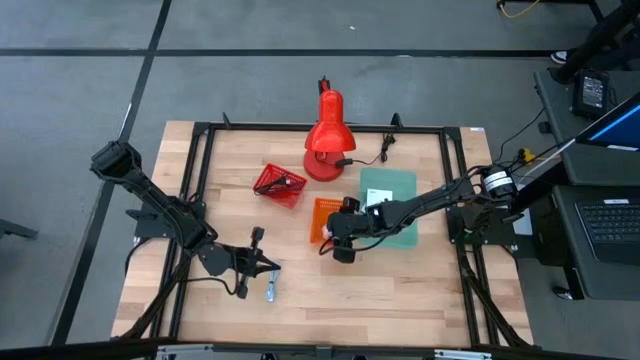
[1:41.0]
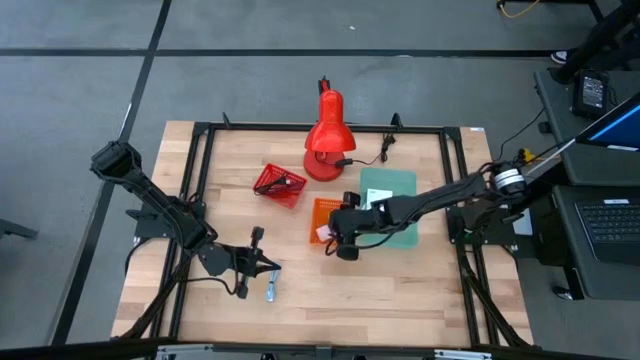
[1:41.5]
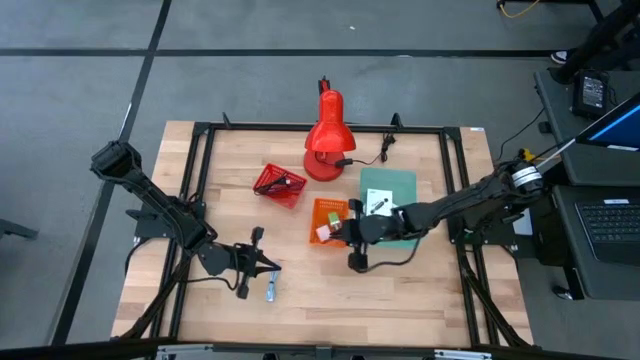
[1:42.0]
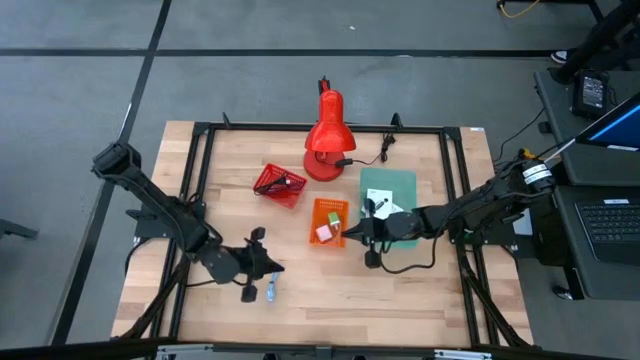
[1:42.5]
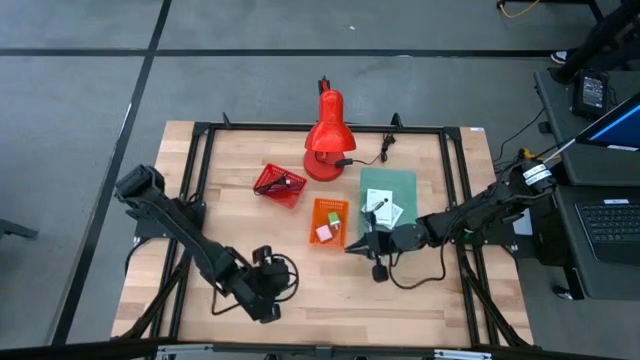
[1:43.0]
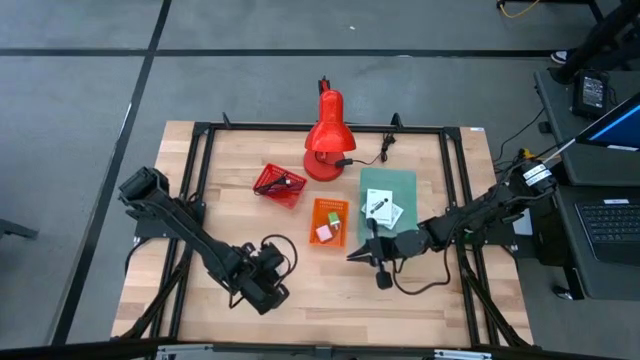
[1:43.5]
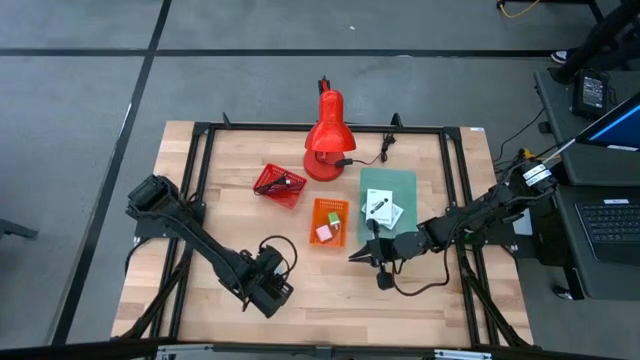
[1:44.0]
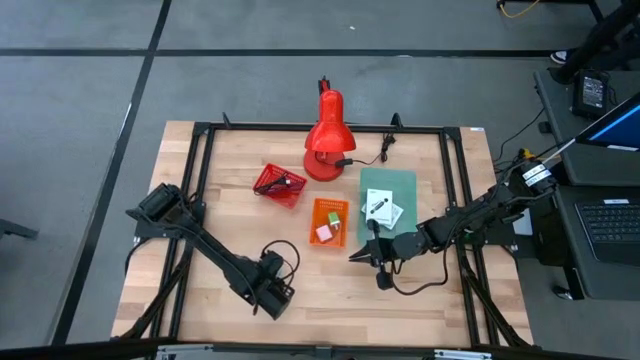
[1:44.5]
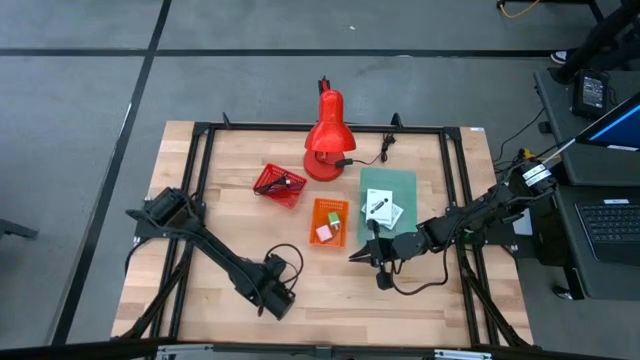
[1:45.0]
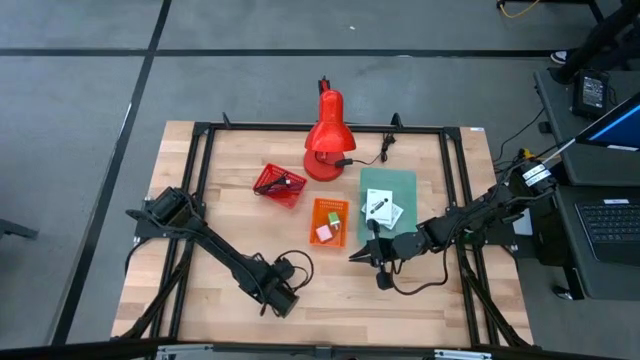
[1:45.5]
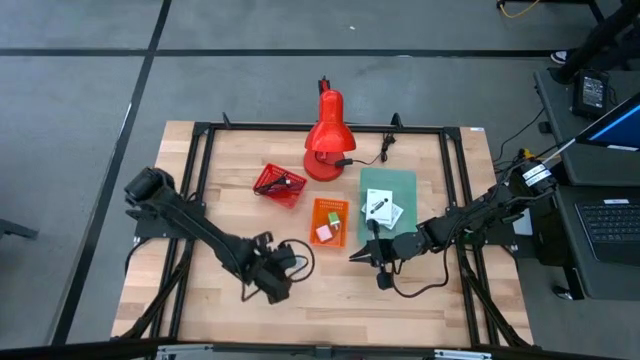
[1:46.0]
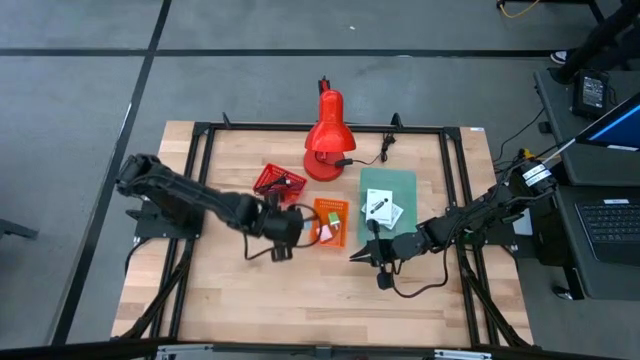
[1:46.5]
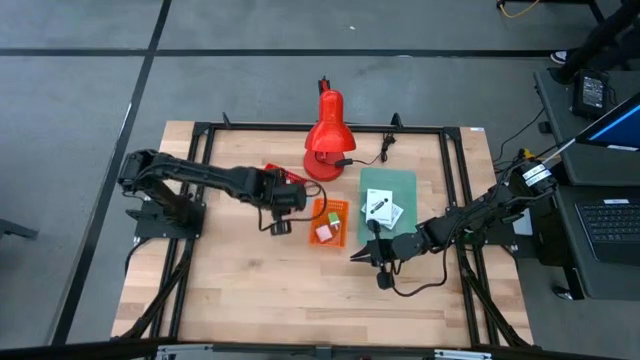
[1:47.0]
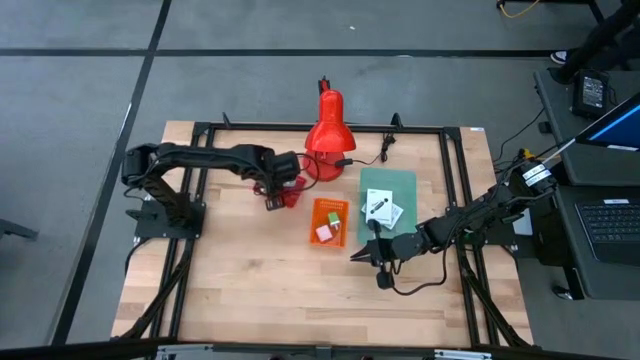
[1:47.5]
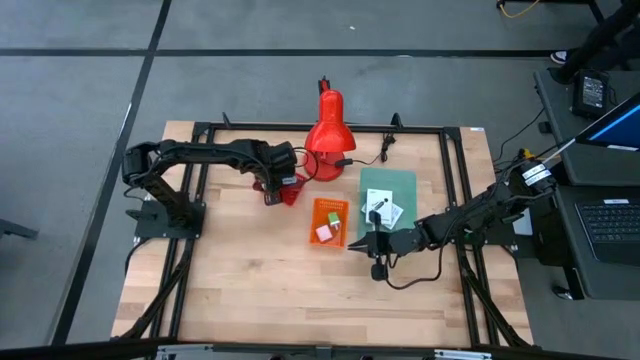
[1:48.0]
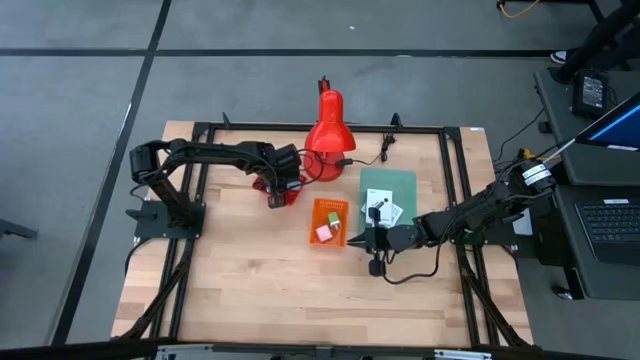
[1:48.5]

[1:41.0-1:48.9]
Task: Pick and place items into bin
Put the blue USB cable into the red bin

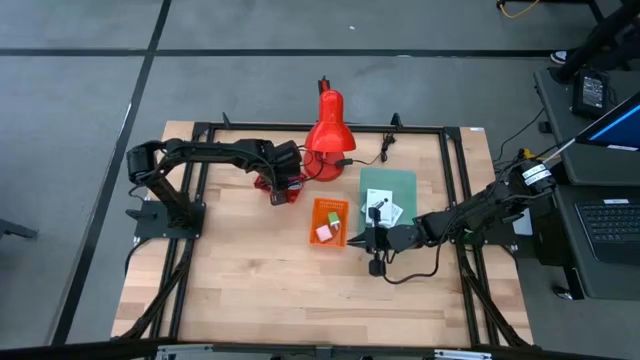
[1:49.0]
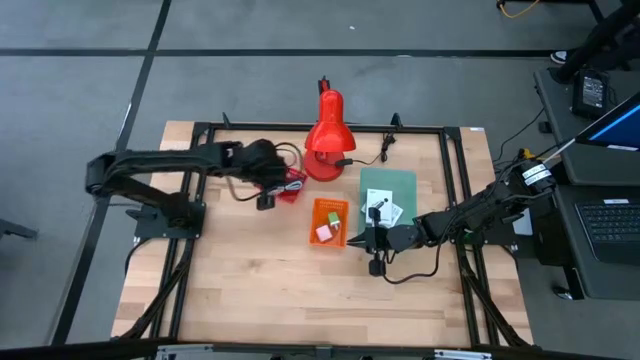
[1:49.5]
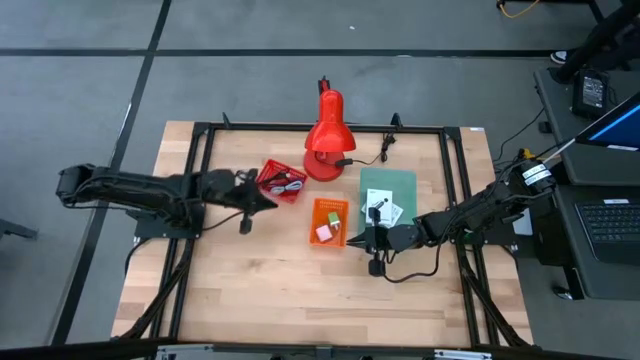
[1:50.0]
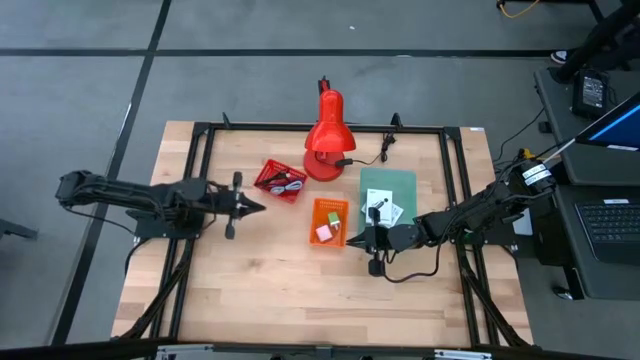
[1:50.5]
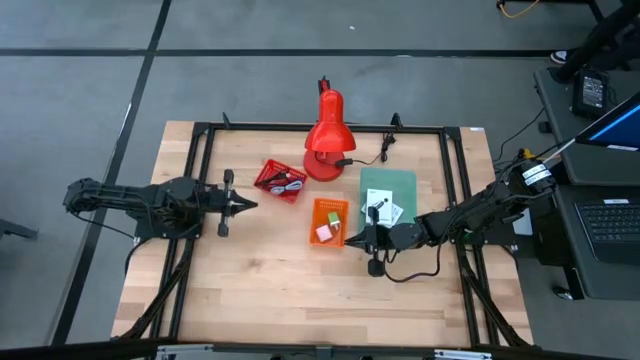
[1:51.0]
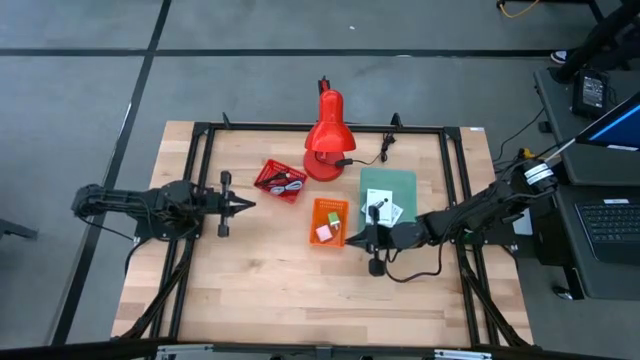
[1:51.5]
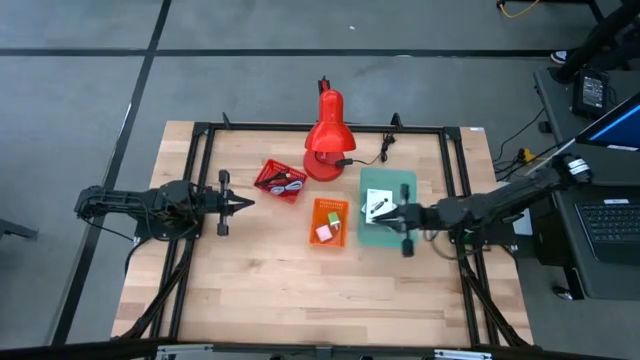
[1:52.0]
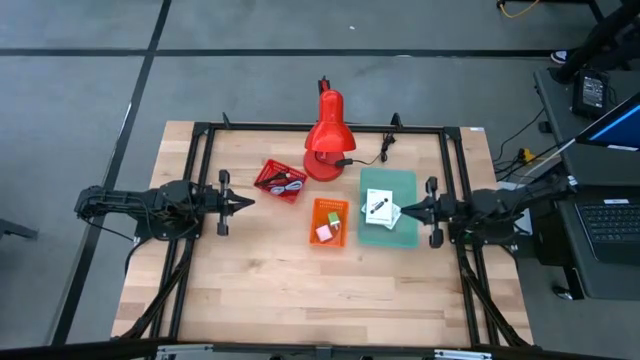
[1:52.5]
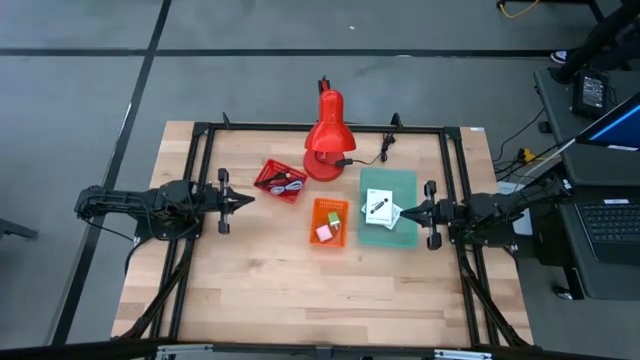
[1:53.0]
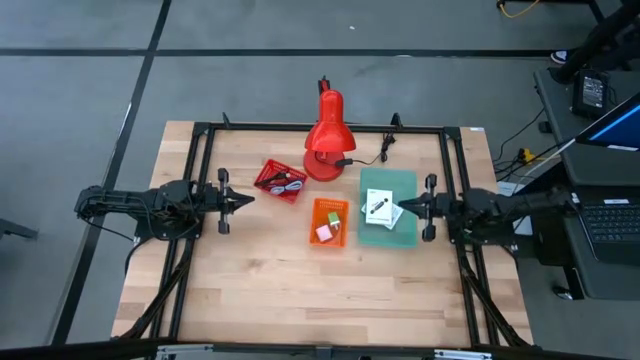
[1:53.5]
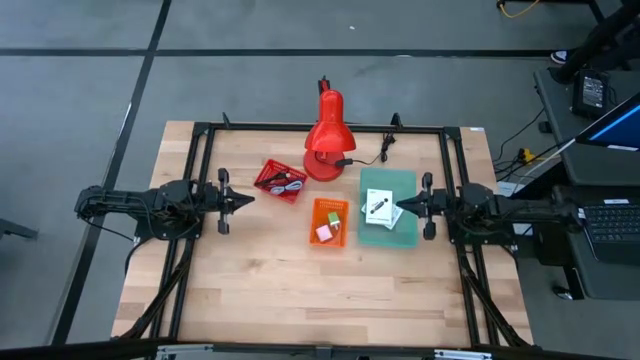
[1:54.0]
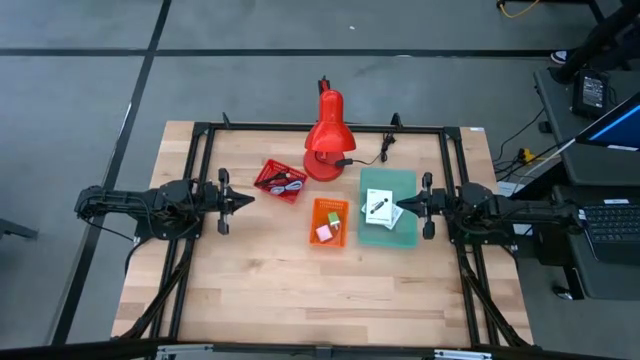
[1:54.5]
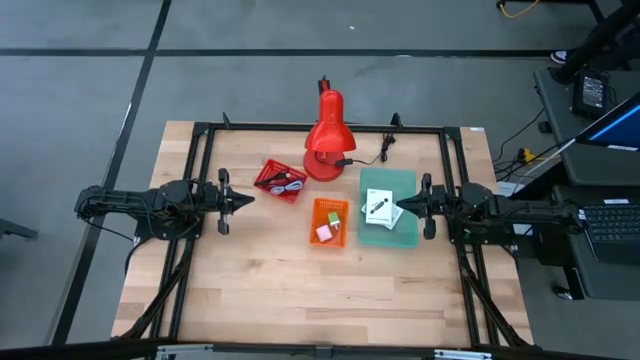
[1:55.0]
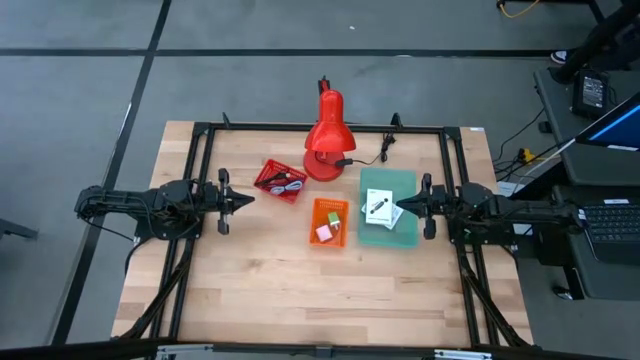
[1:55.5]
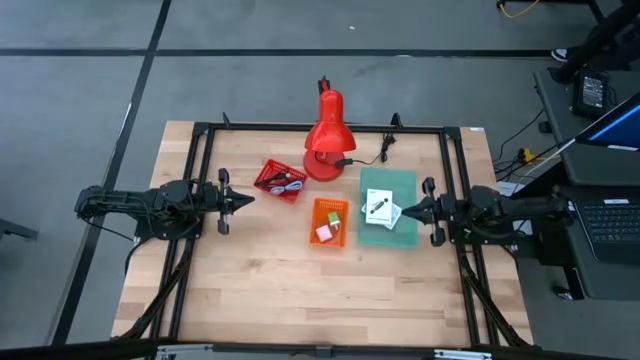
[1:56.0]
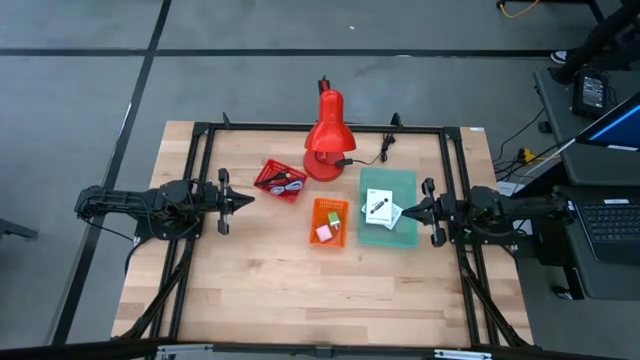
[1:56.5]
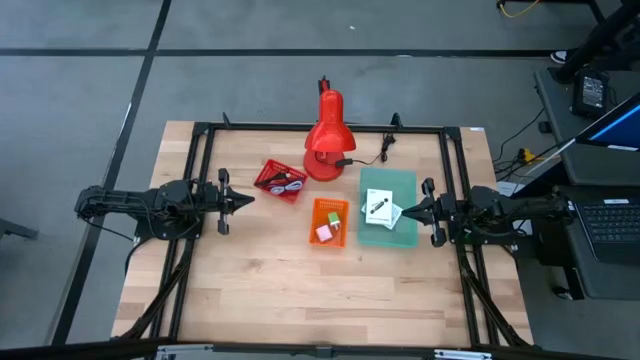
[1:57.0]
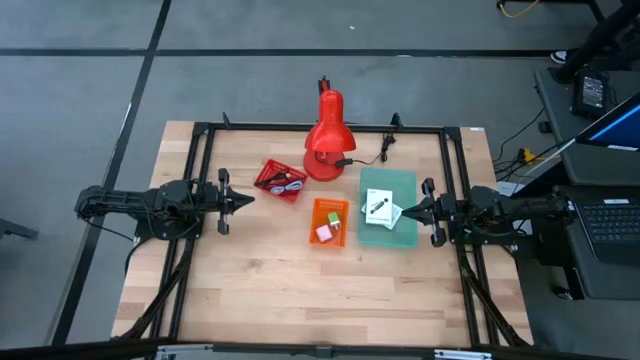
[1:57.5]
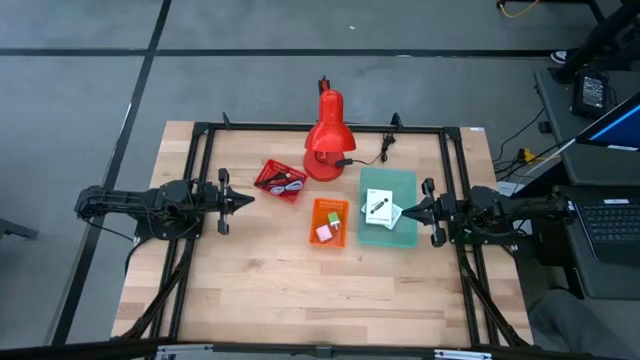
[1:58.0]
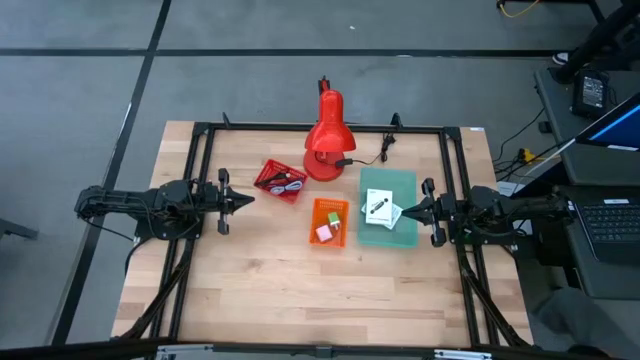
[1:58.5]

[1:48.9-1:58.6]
Return to Home Position

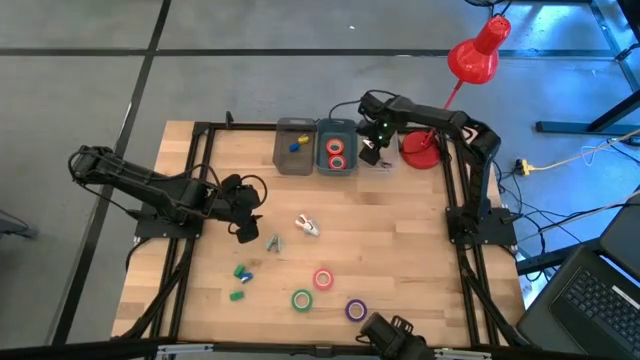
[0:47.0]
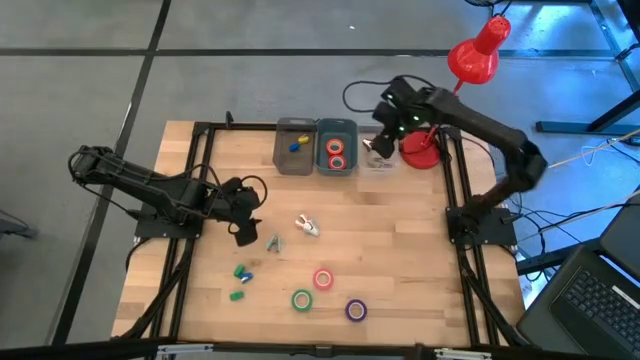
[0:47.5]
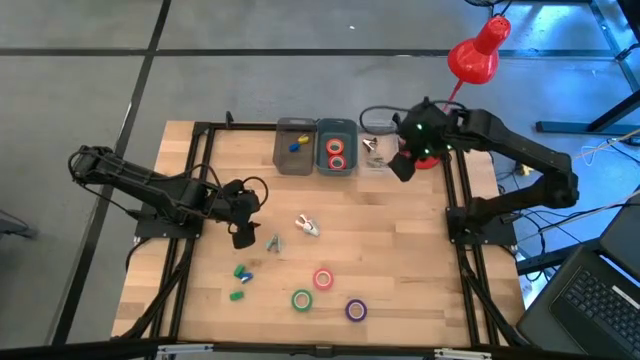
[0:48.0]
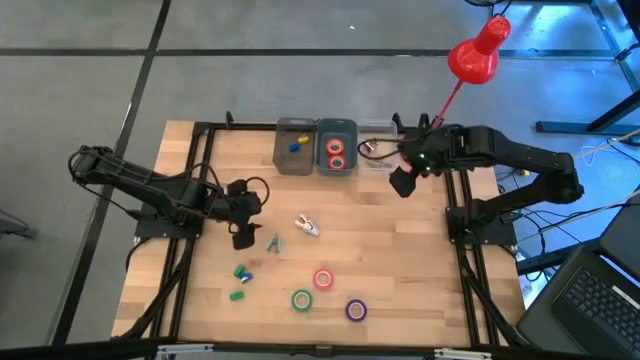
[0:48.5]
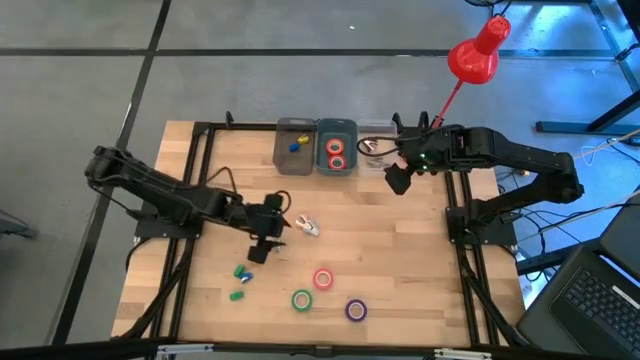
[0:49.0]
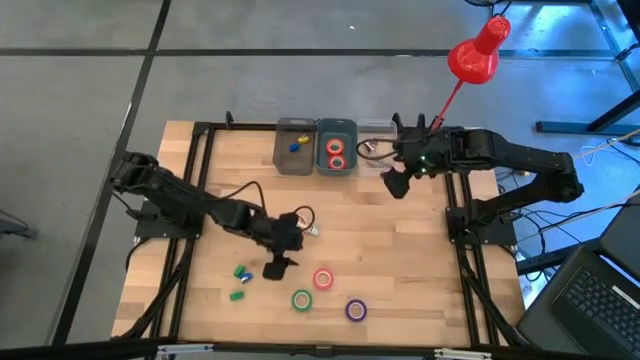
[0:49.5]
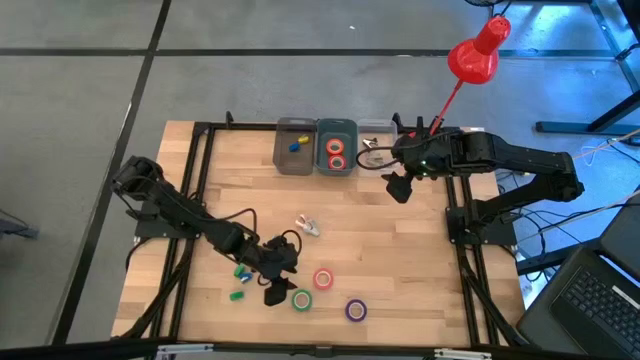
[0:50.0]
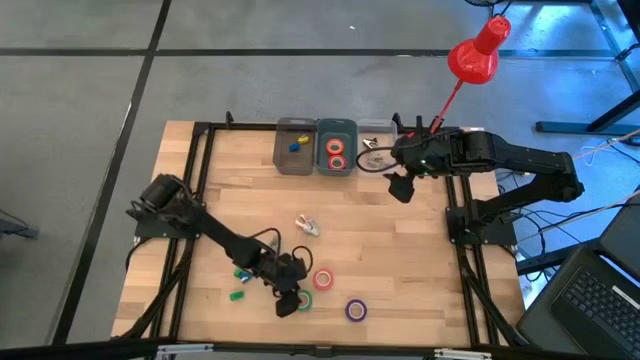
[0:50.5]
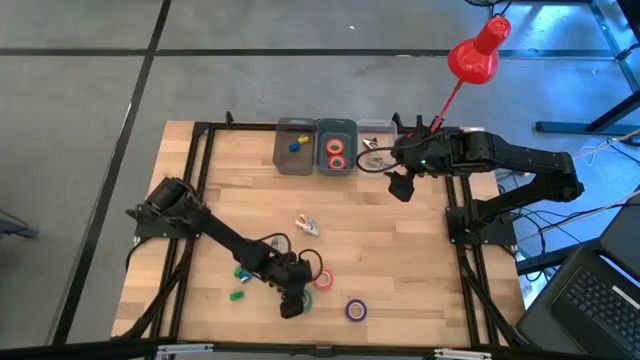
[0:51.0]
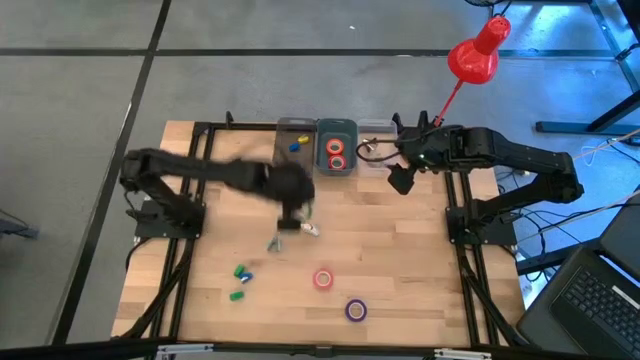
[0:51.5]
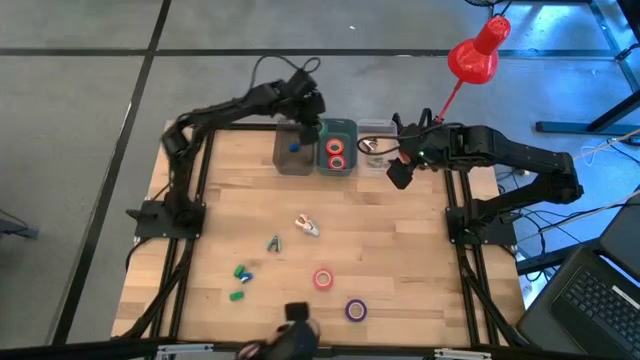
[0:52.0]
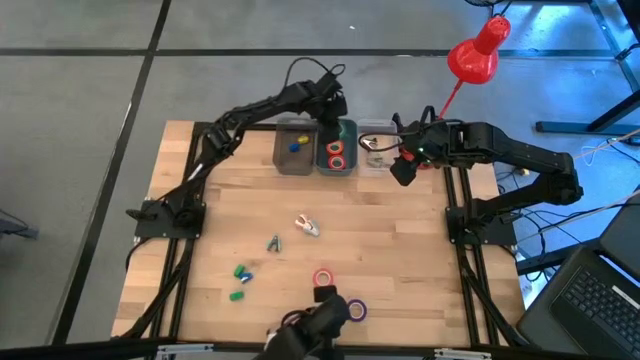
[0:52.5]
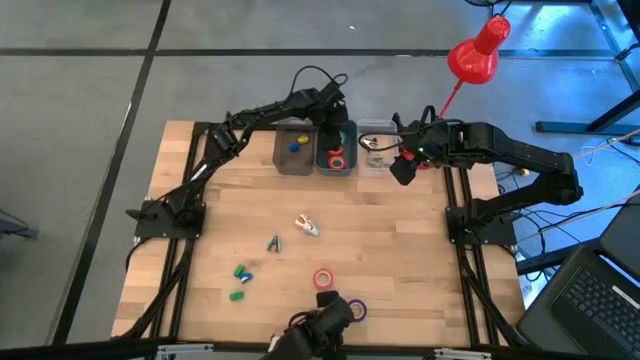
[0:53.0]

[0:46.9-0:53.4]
Task: Pick and place Stapler, Stapler remover, tape
Put the green tape into the green bin
